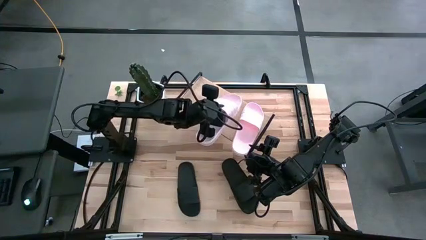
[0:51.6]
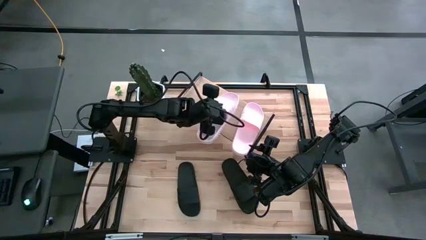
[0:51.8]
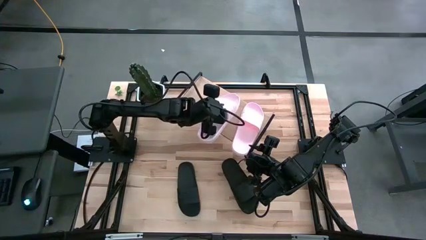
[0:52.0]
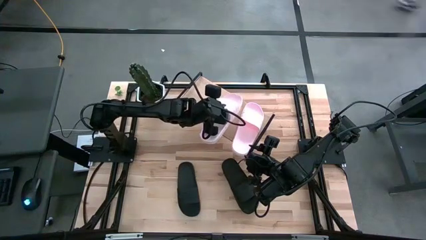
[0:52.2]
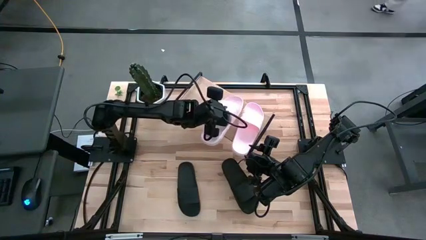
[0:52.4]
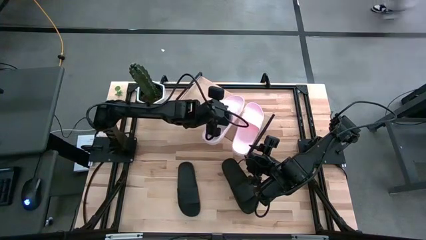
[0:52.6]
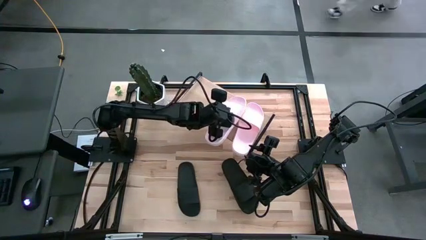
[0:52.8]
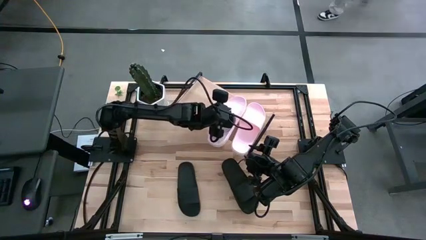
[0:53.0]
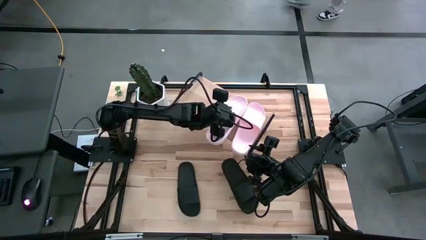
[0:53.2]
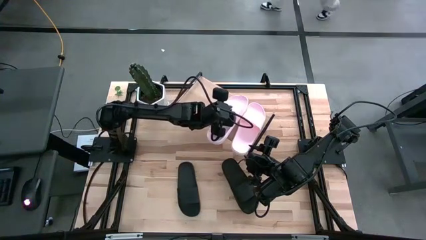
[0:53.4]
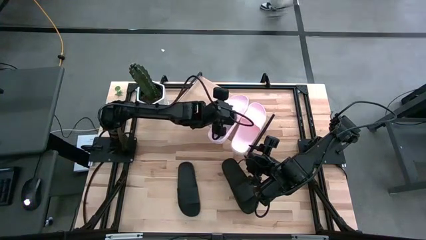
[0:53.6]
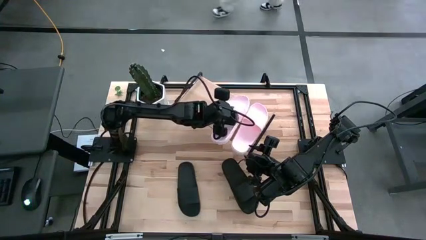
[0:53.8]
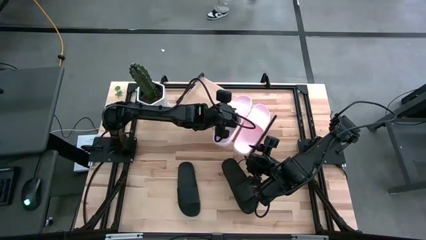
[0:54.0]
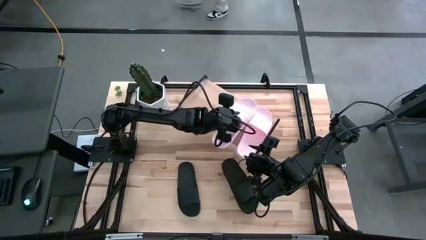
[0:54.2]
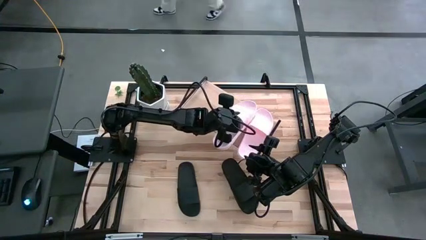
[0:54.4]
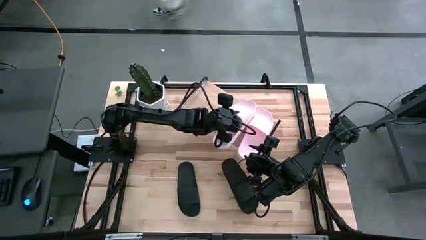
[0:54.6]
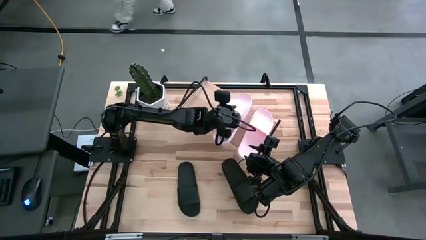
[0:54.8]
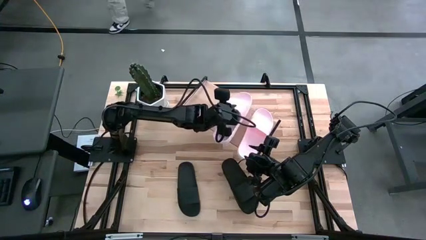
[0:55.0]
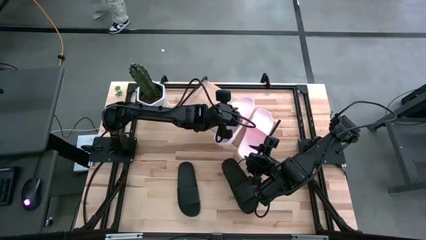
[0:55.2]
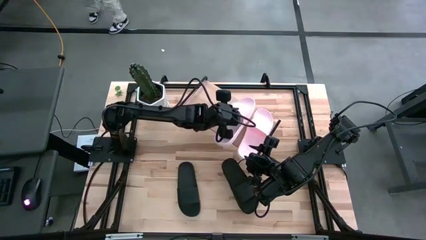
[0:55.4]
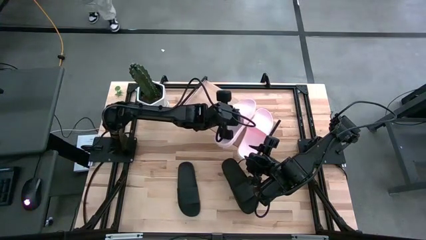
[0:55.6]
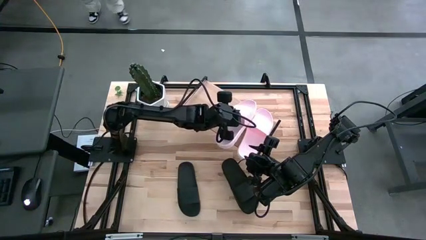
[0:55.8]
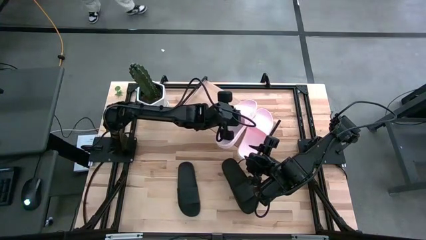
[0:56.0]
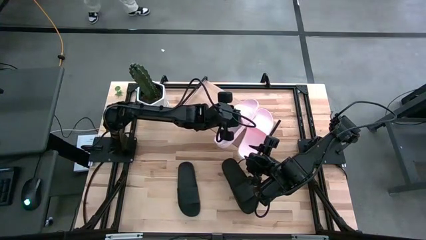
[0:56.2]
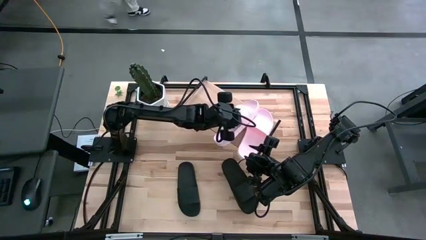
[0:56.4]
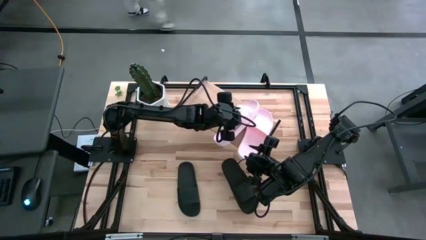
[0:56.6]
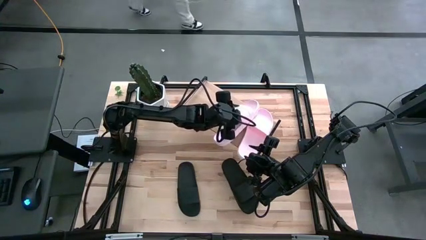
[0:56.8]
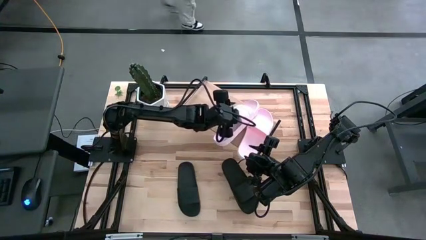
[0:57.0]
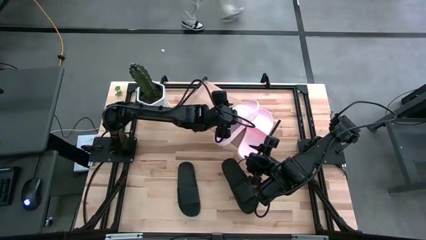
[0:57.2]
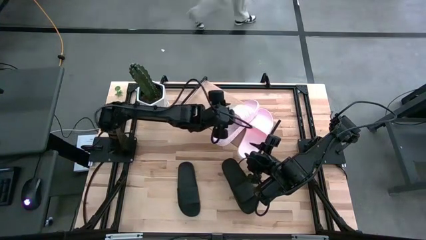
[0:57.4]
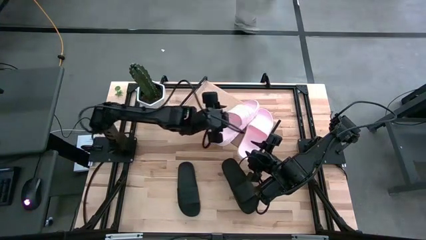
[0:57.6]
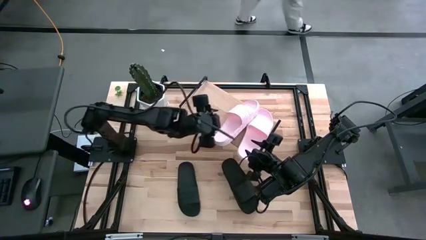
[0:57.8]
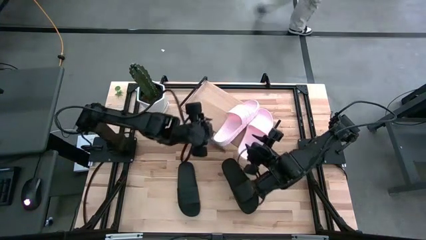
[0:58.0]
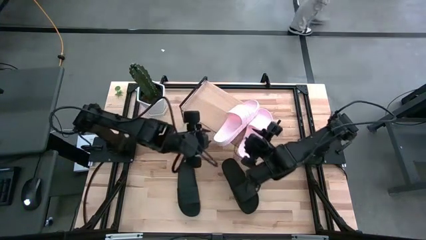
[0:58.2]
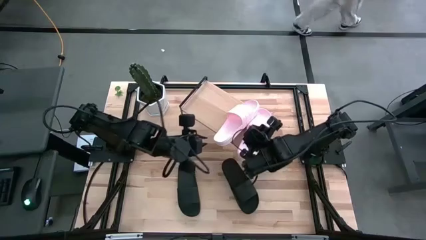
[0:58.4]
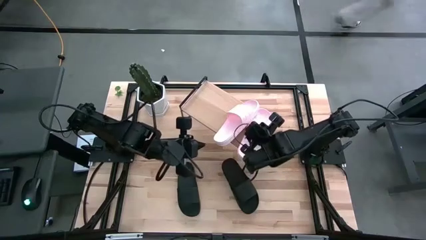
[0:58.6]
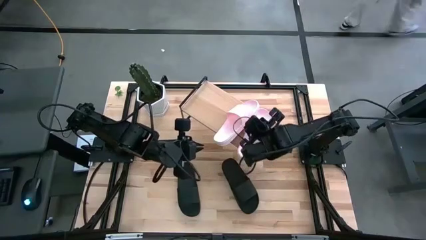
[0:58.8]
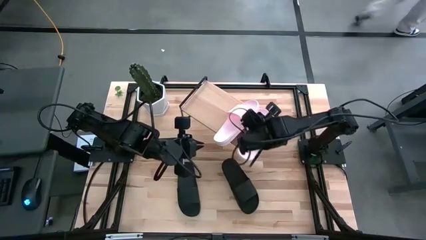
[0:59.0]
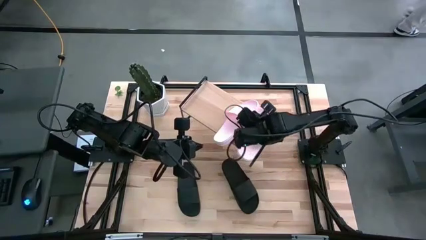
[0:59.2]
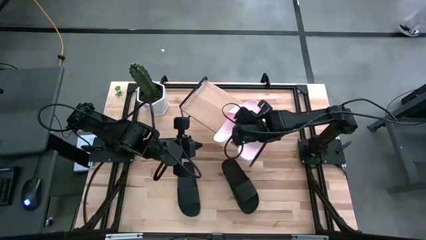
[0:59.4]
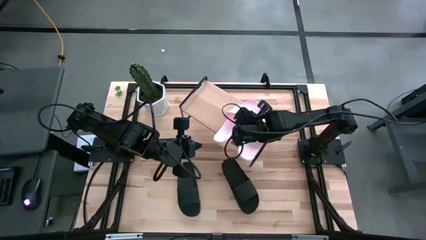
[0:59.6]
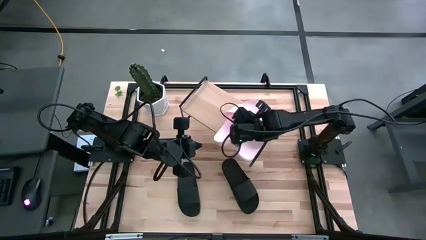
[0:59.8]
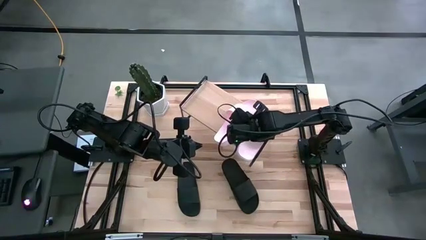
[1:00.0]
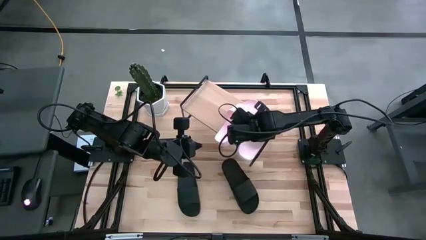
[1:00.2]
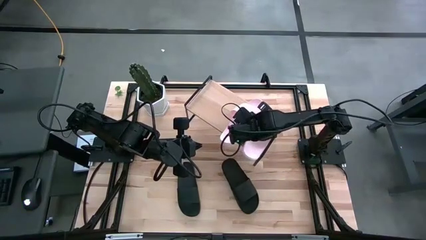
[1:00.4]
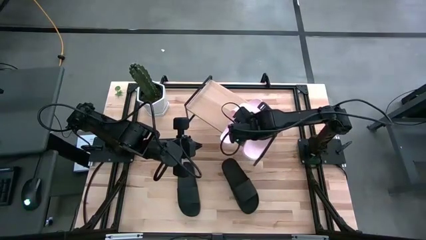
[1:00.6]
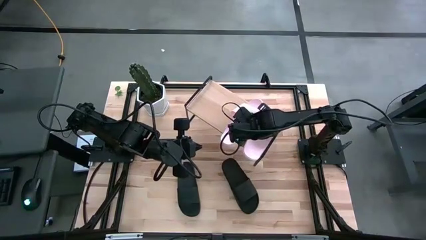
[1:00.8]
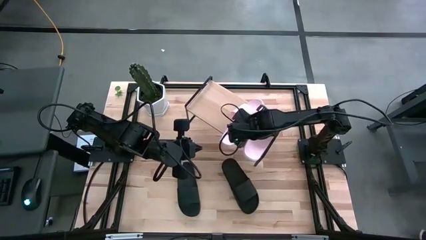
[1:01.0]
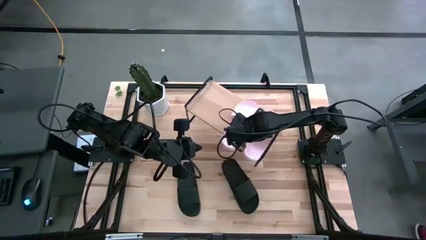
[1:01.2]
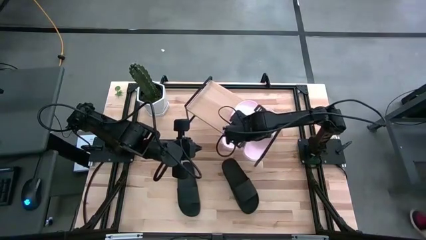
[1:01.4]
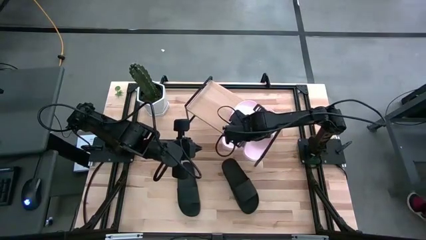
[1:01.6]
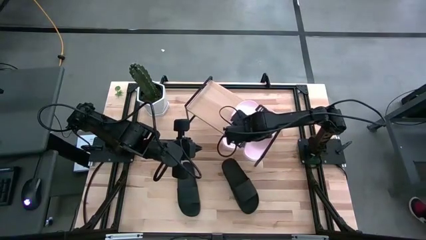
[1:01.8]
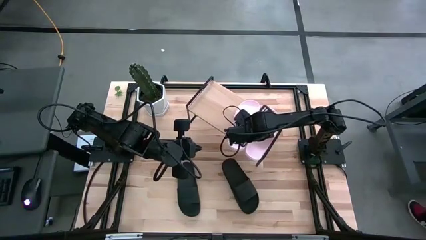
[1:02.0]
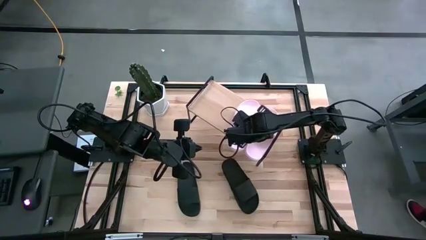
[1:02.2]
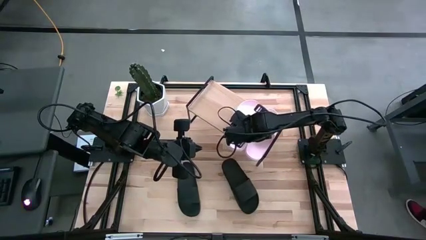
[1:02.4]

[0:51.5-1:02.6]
Task: Pick and place slides into the shelf
Put the pink slipper on the shelf

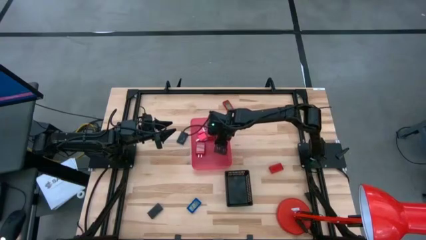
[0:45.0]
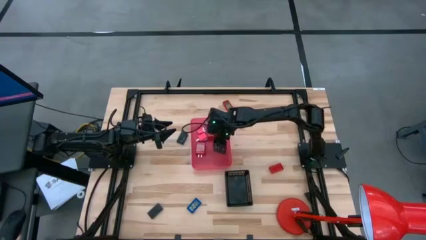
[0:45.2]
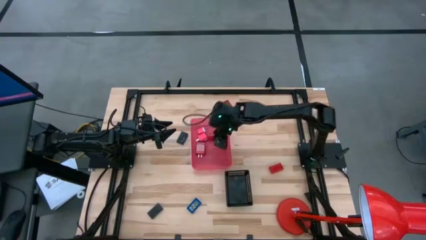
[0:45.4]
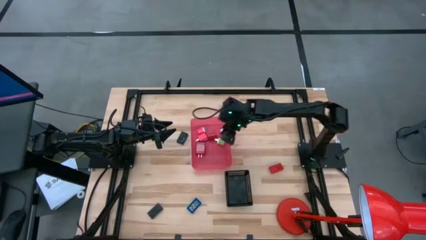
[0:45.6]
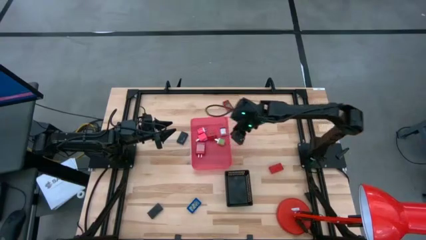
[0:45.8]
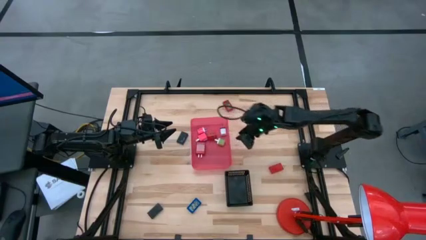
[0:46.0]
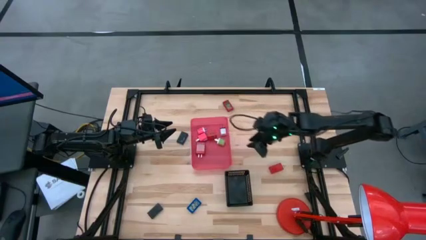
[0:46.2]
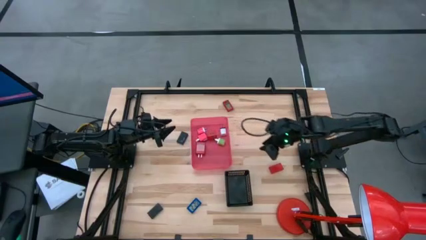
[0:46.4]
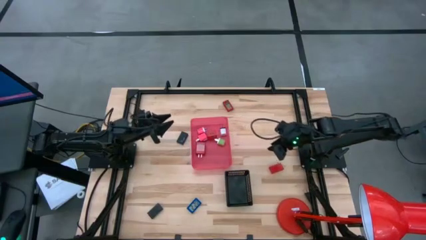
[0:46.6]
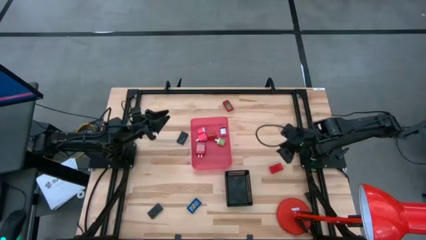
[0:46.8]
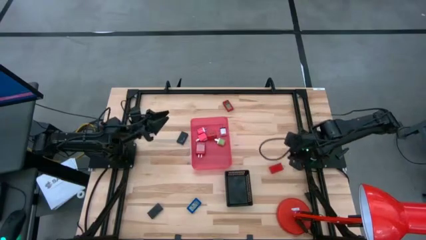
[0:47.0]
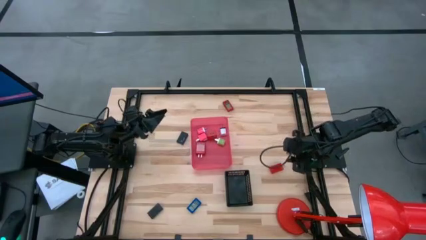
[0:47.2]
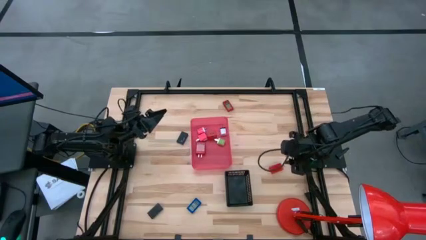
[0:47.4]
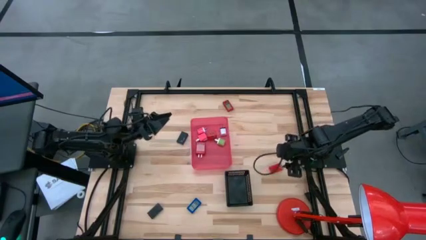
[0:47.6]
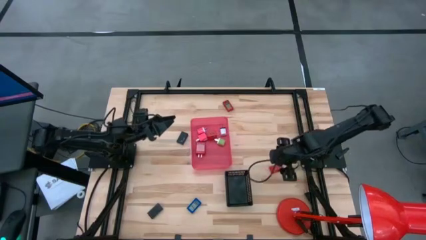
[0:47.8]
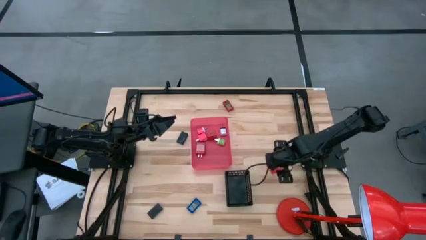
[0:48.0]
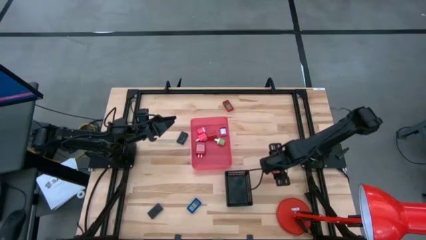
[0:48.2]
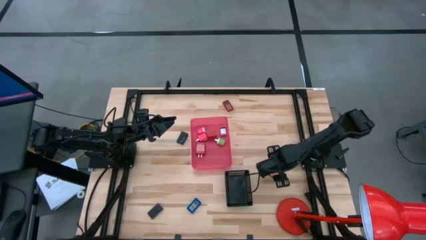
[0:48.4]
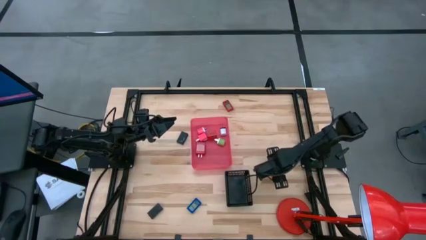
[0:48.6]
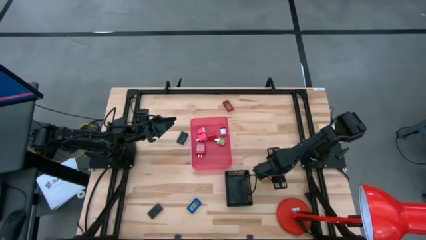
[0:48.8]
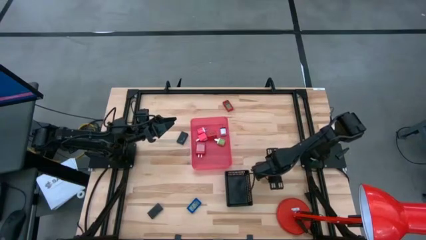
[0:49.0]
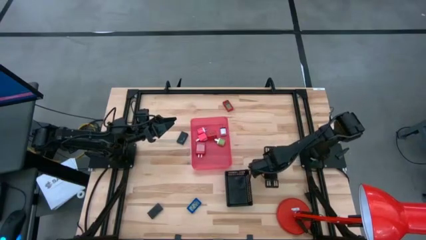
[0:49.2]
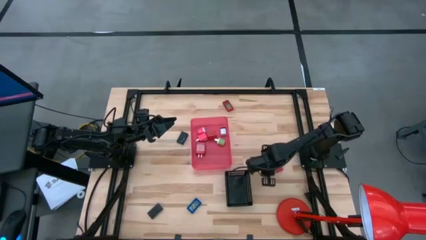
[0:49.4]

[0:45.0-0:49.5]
Task: Pick & Place Office items
Put the bottom red digital timer into the black bin
